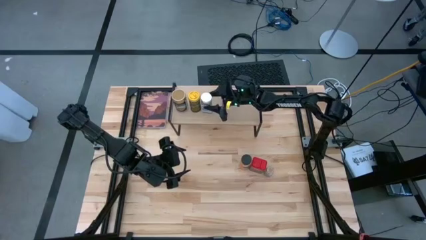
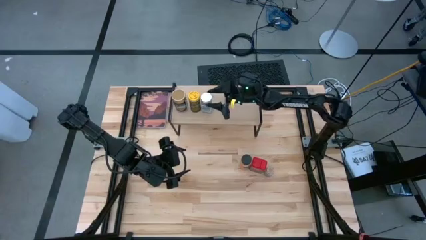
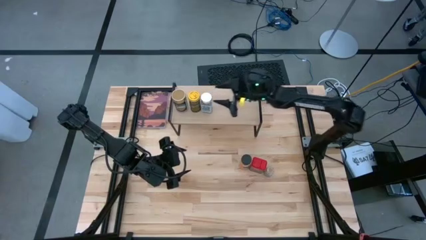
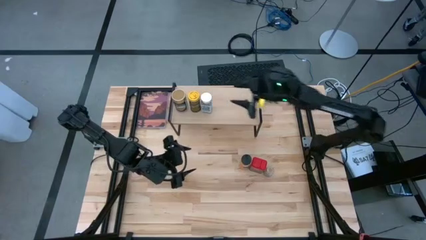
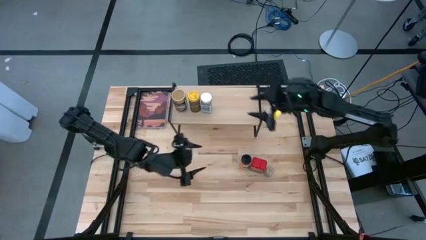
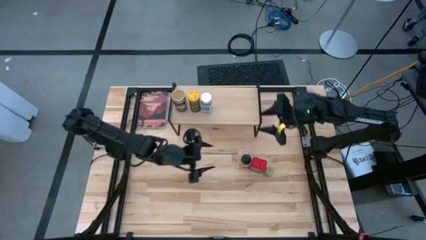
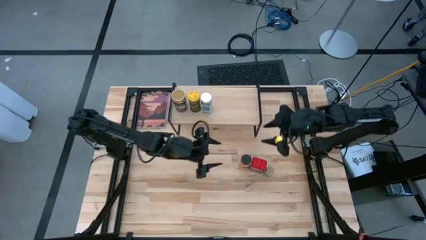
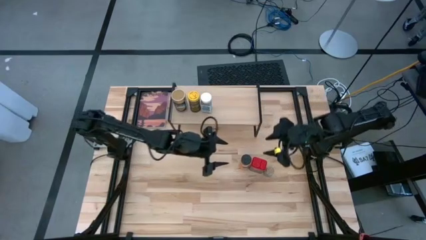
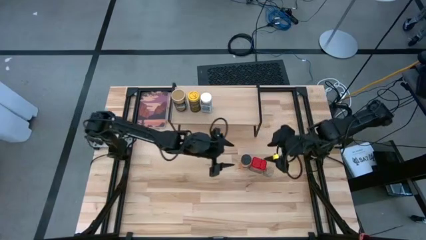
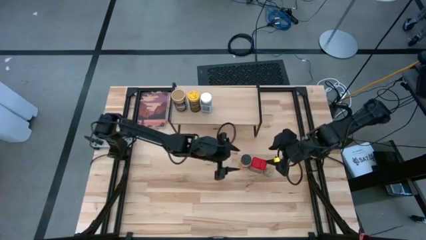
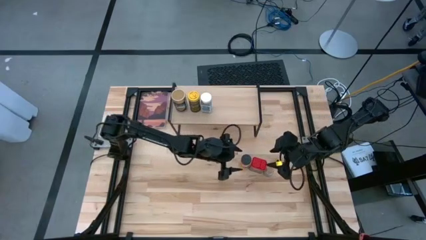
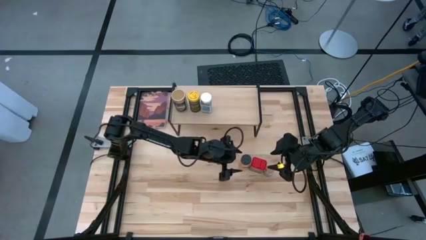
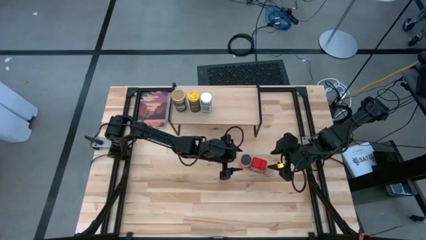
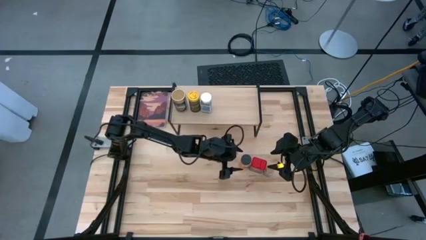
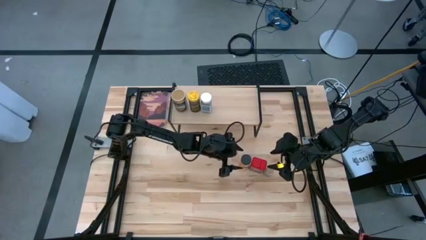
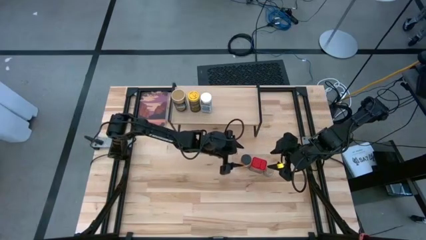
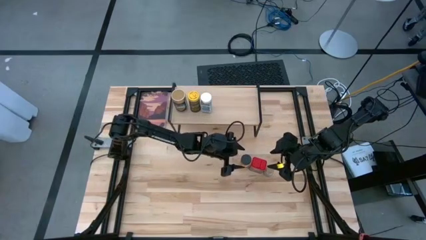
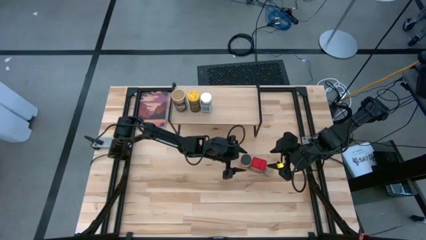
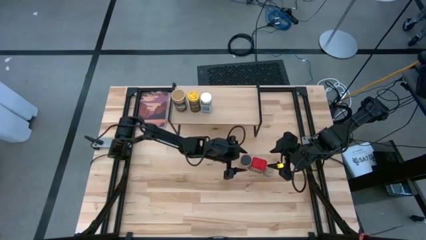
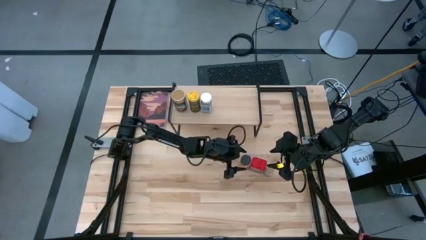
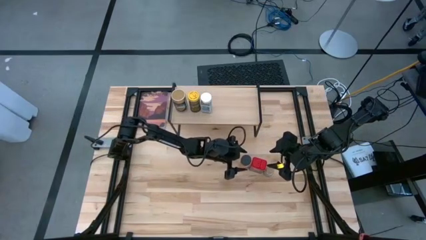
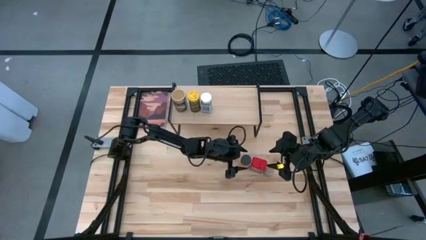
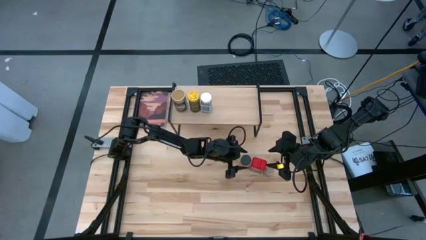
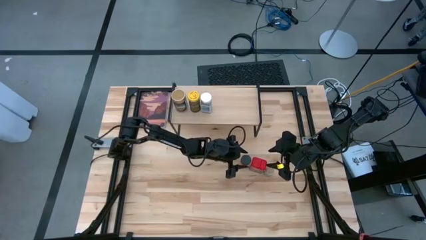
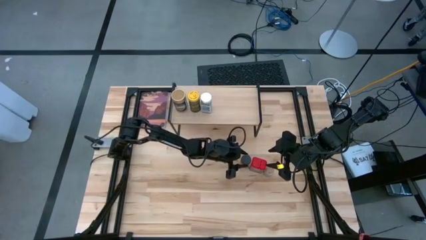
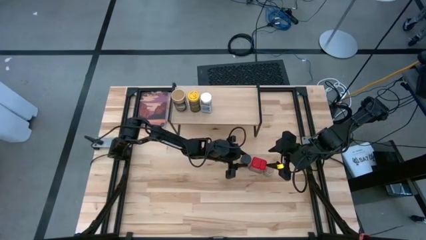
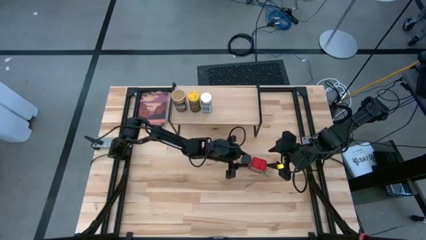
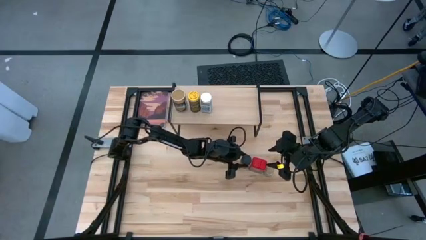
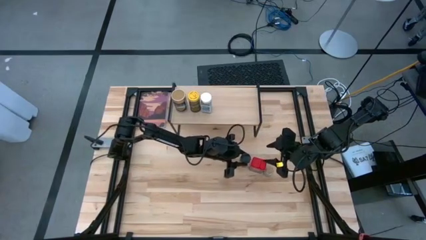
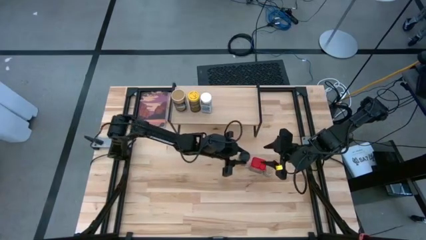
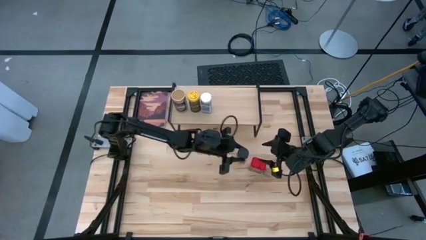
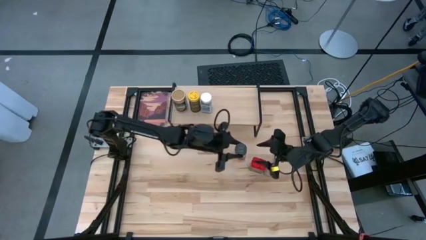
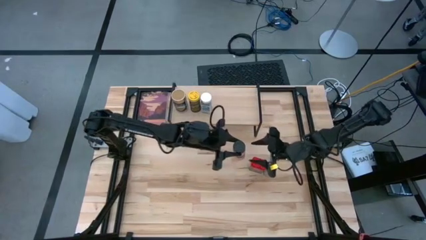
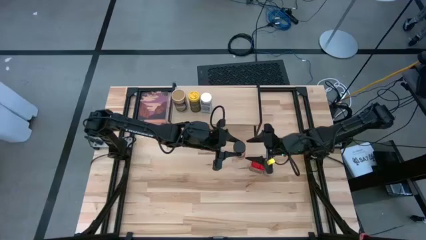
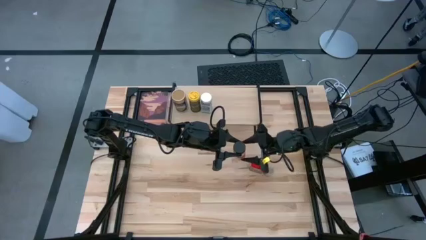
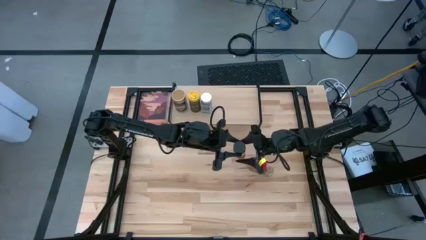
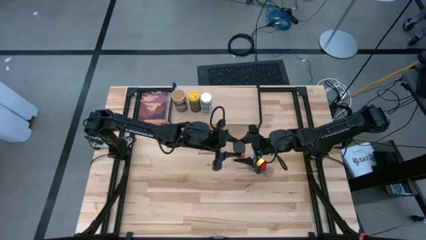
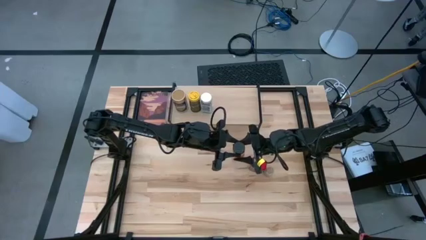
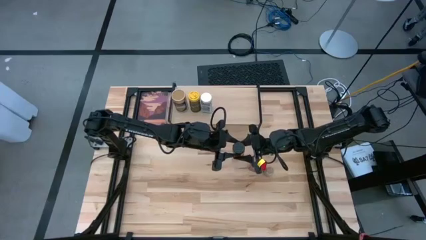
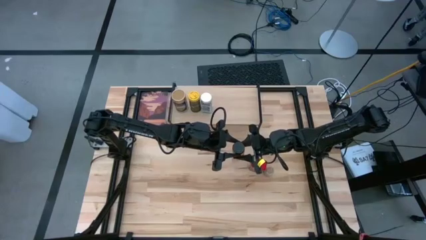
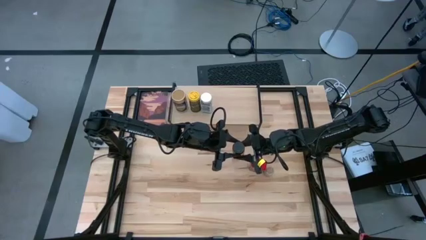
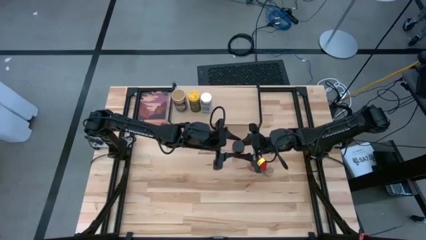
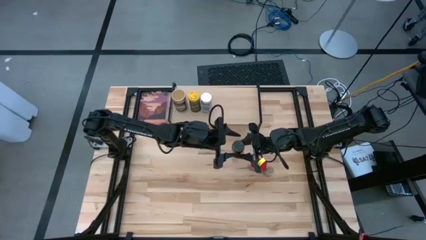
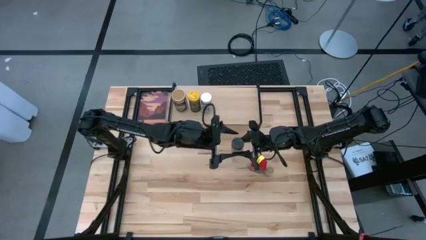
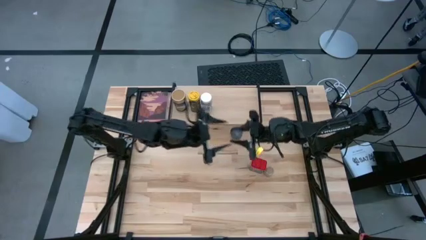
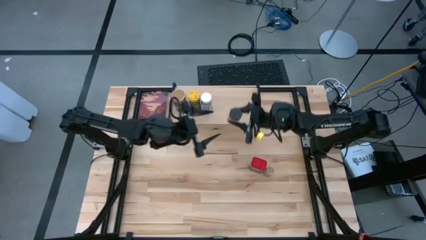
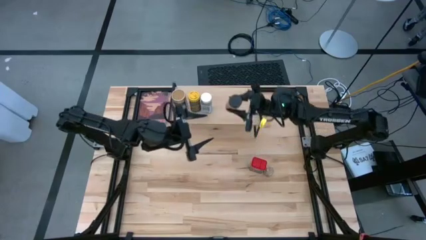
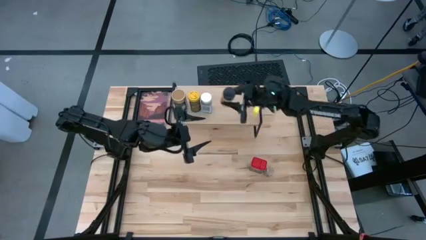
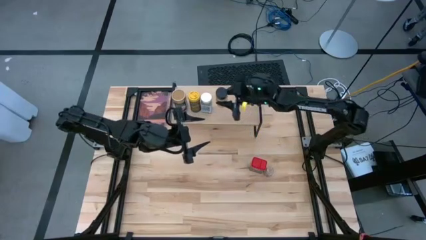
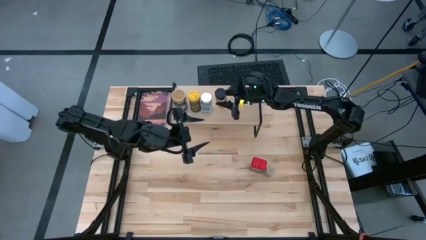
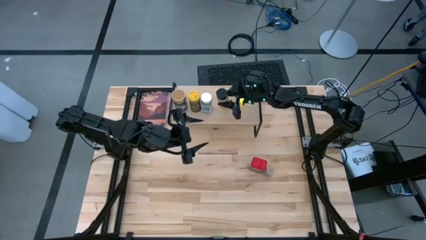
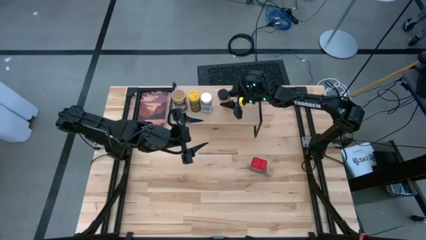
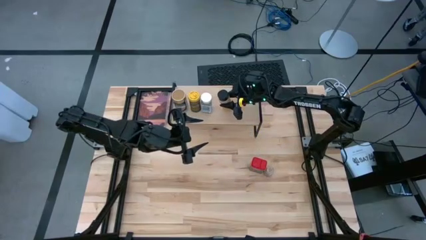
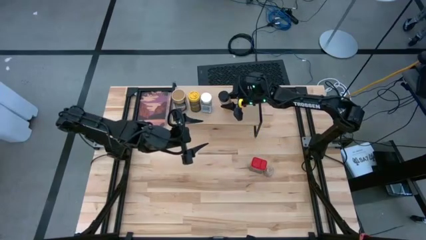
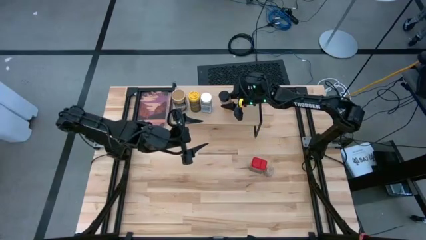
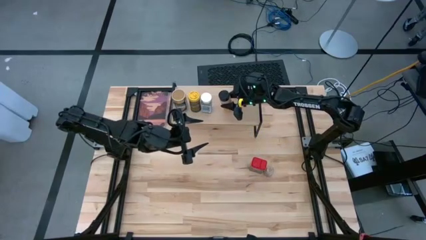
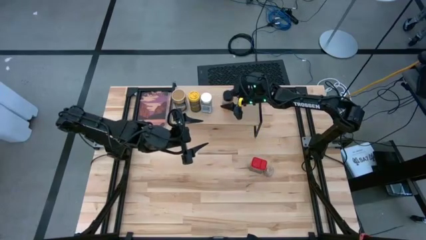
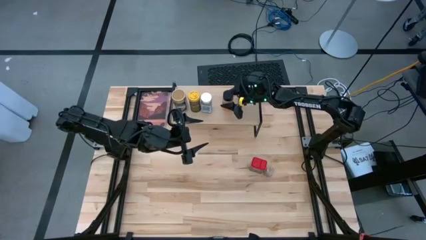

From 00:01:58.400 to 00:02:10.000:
Task: Shelf spices
Put the orange seasoning bottle on the shelf

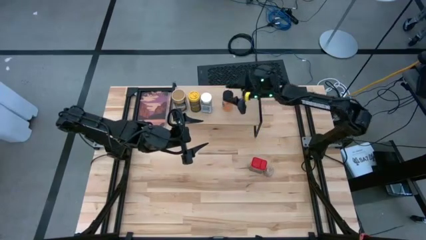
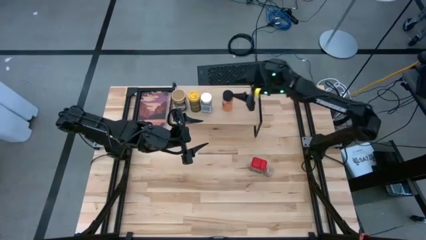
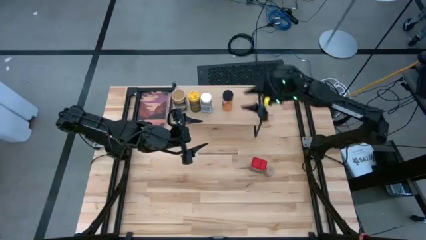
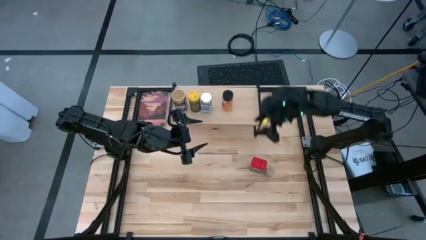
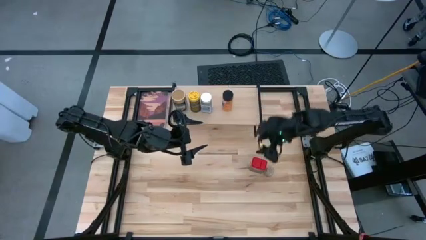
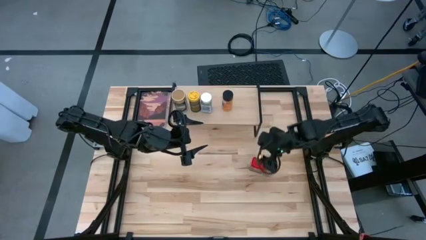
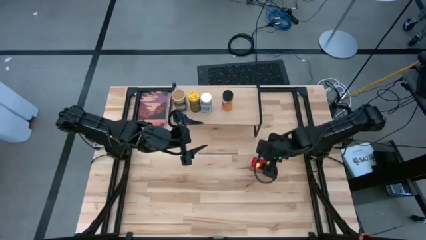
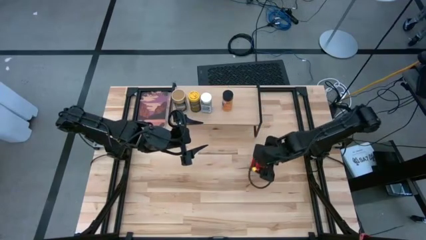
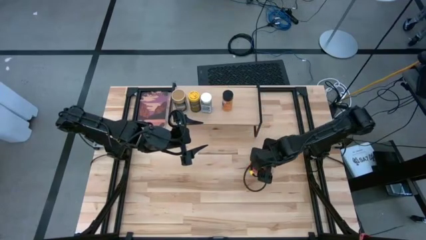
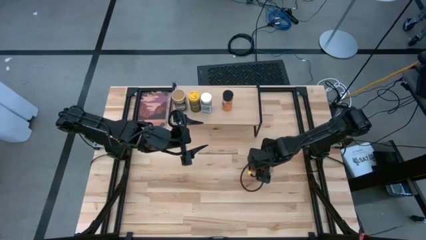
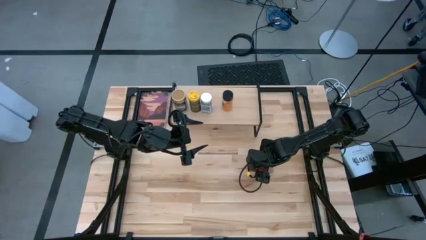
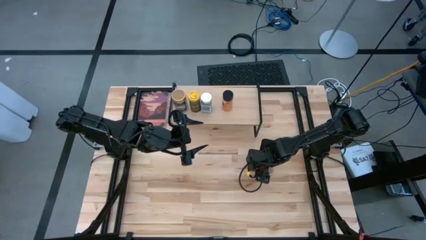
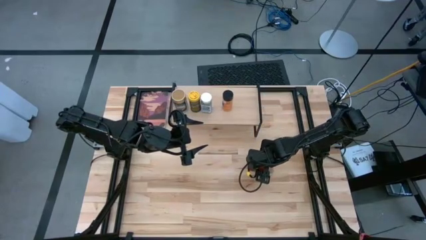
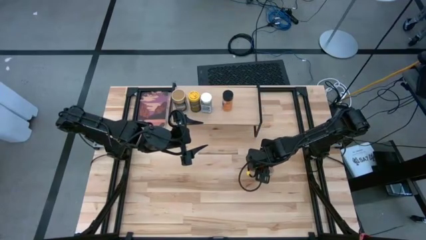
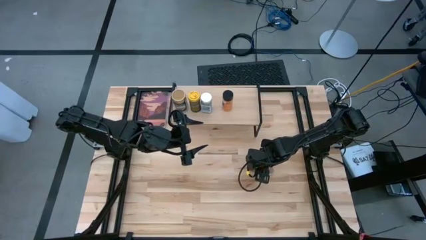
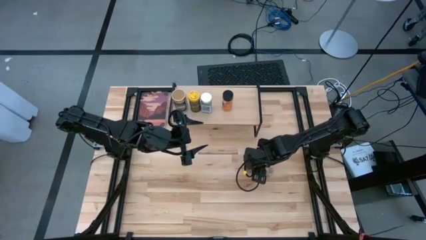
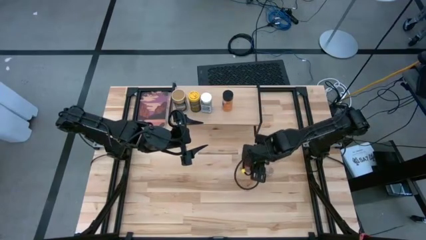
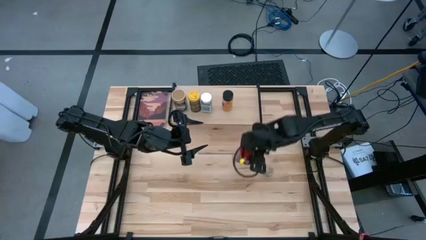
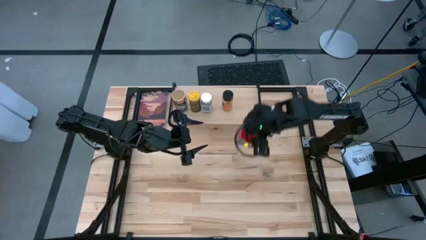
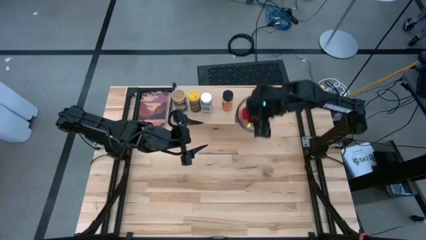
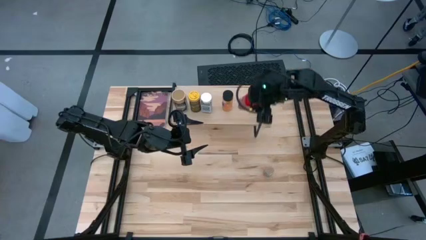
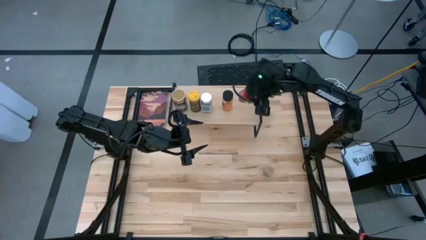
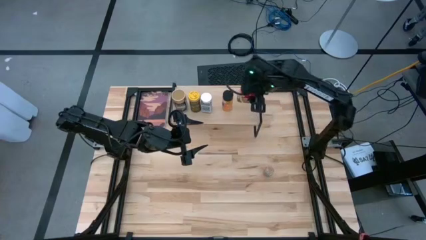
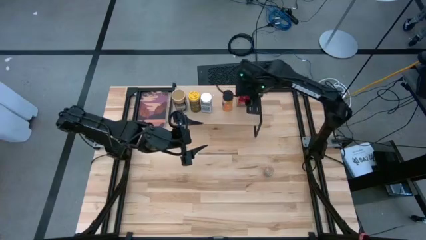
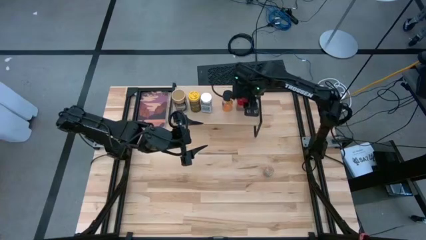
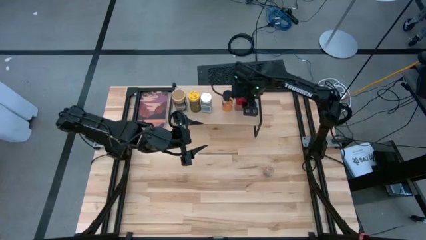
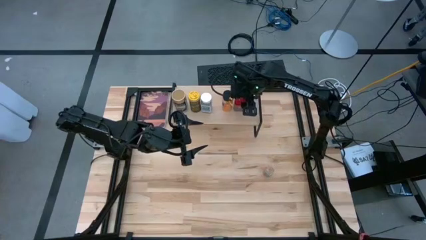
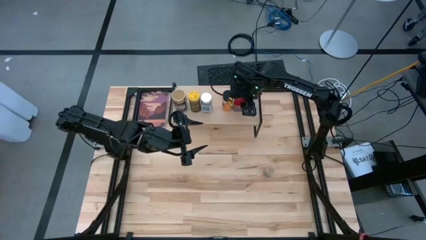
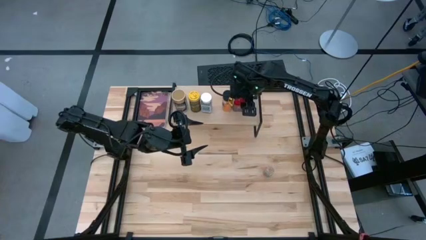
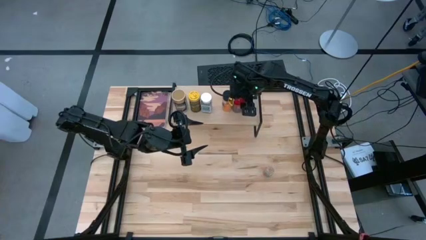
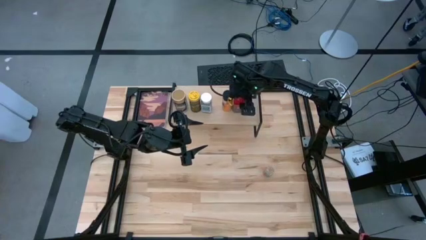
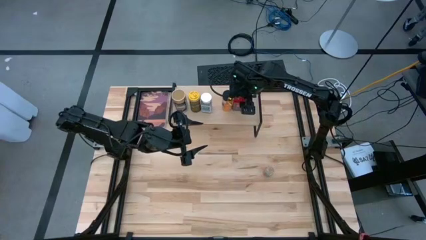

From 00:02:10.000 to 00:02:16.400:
Put the red seasoning can on the shelf
